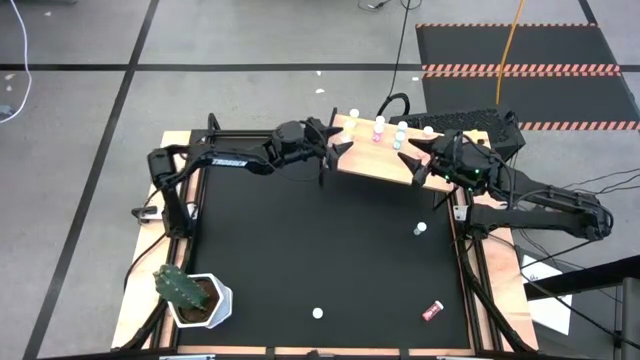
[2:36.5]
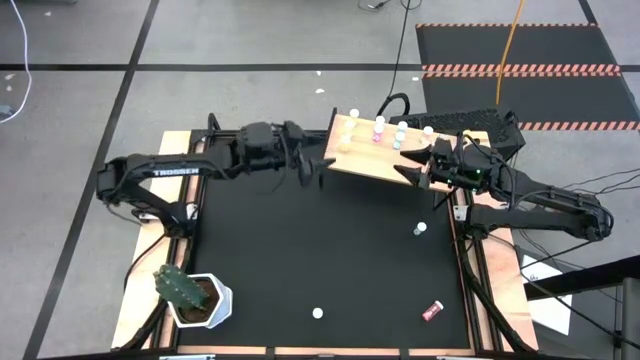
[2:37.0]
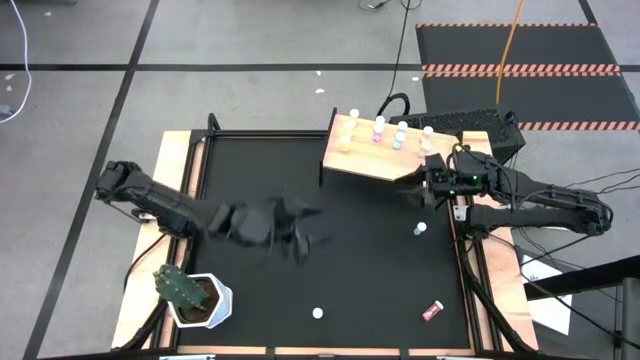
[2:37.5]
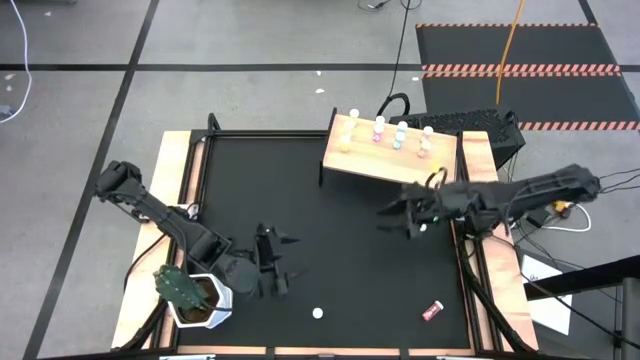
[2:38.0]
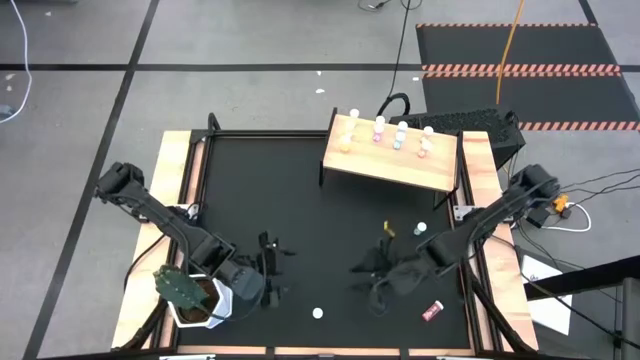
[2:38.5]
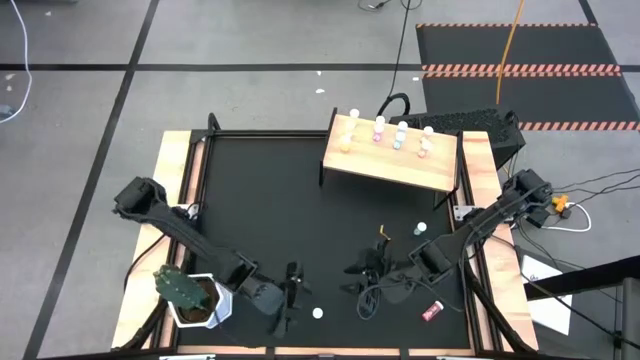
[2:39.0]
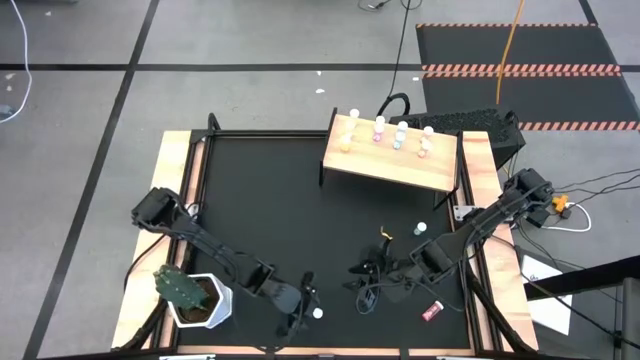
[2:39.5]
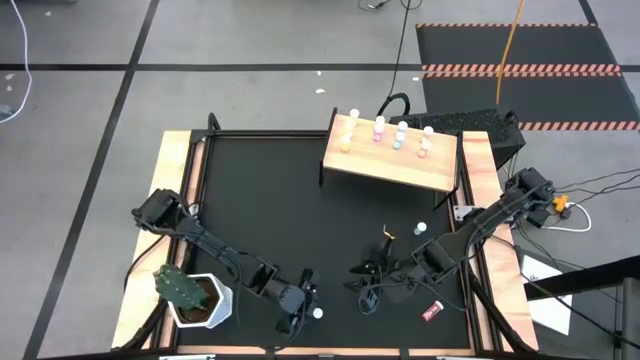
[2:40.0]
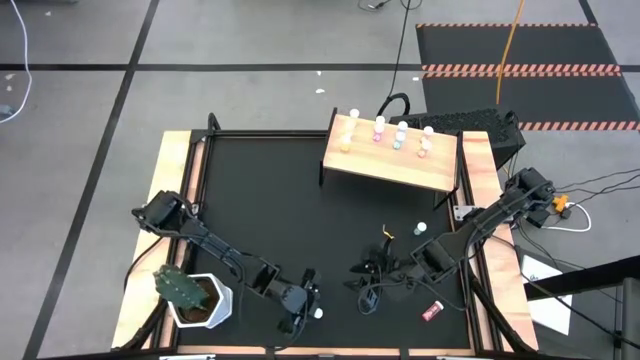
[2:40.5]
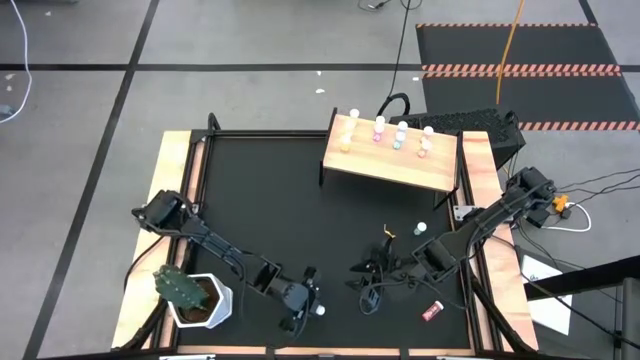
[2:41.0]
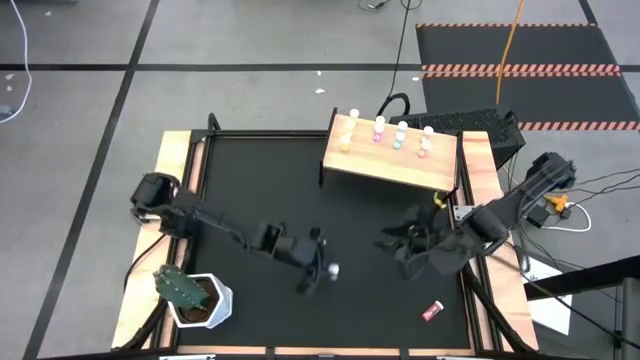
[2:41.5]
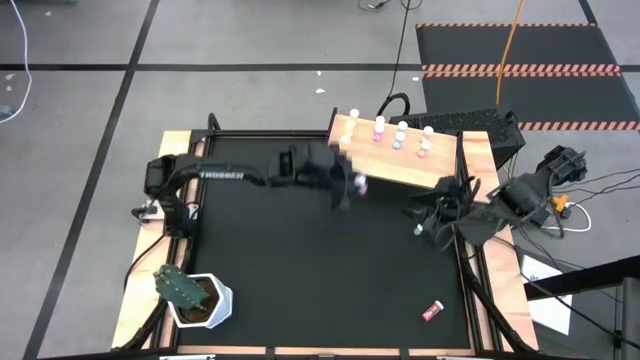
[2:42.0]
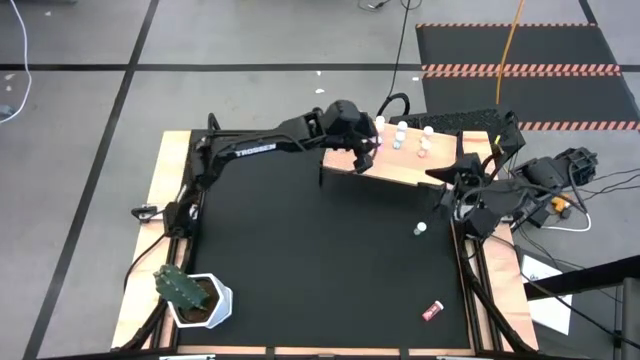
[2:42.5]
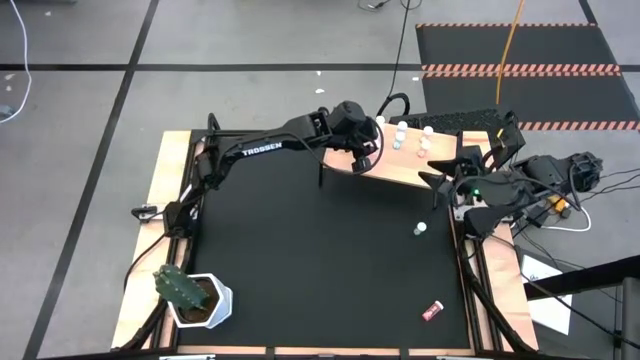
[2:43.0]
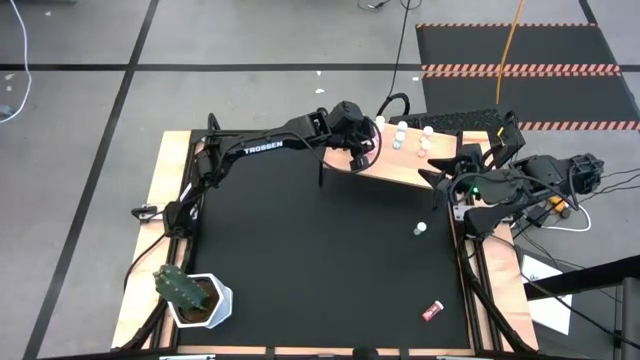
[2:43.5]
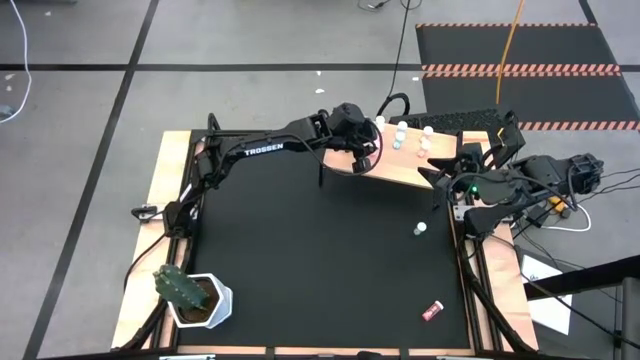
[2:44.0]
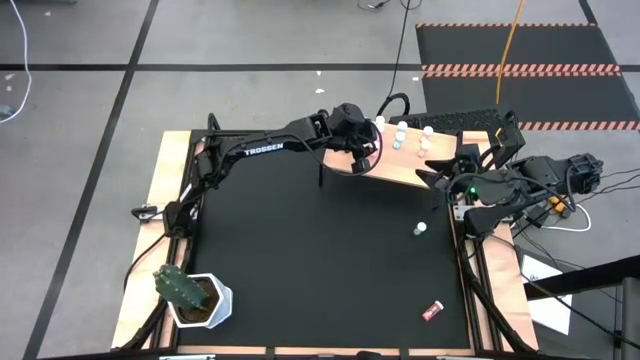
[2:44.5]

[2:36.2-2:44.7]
Task: Pick and place medicine bottles onto shelf by color
Put the pink pill bottle on the shelf aligned with the other pink bottles

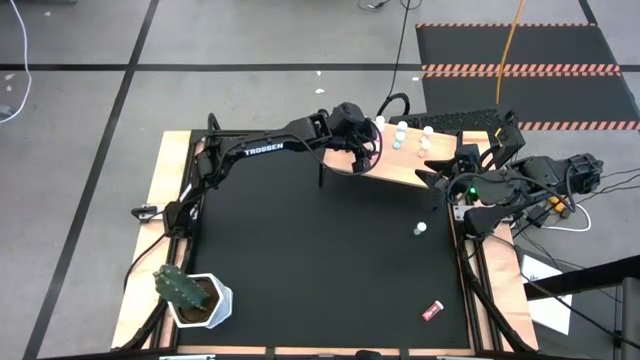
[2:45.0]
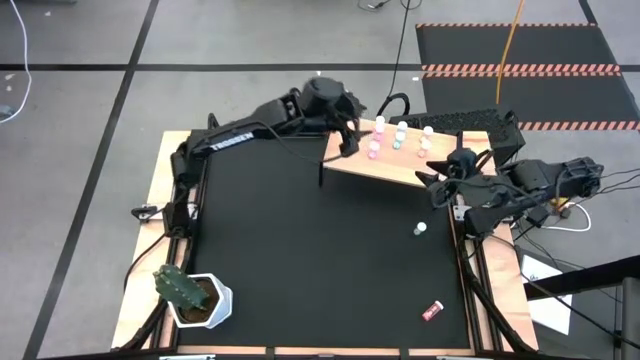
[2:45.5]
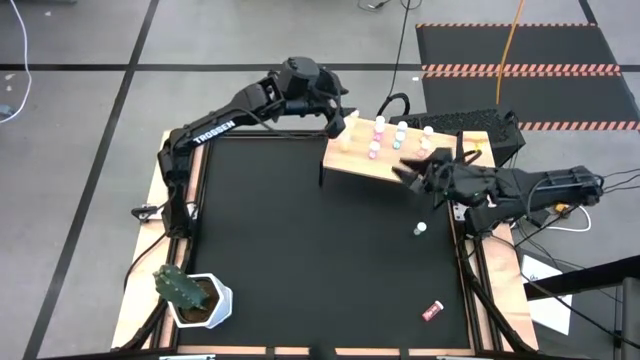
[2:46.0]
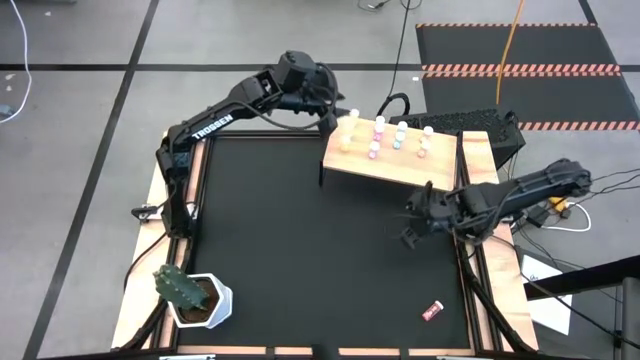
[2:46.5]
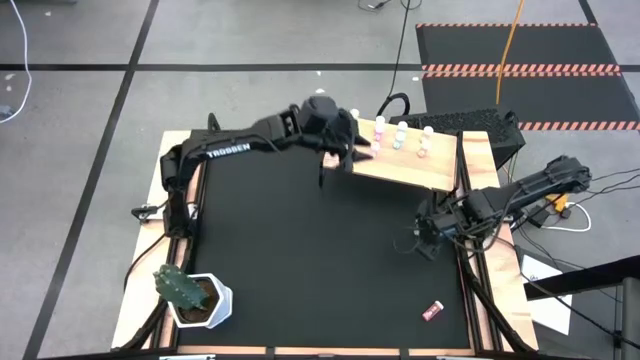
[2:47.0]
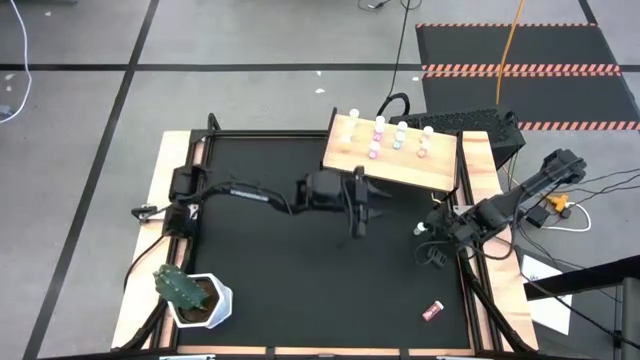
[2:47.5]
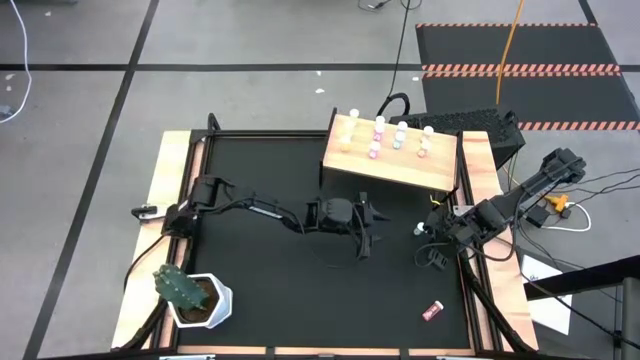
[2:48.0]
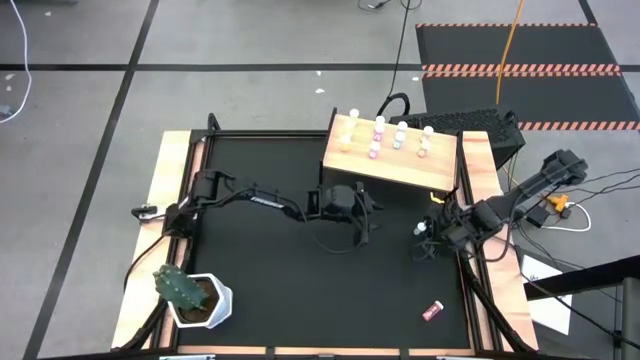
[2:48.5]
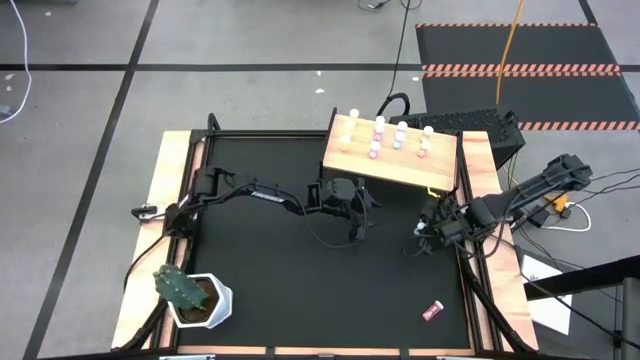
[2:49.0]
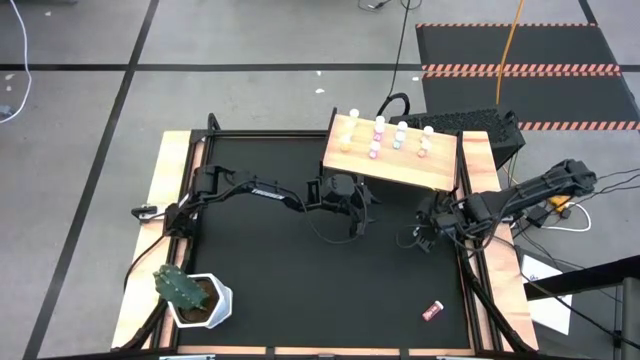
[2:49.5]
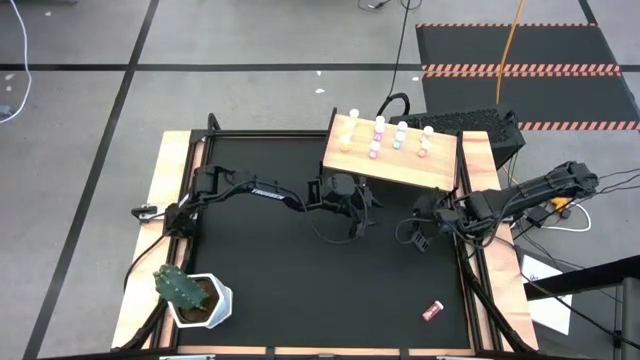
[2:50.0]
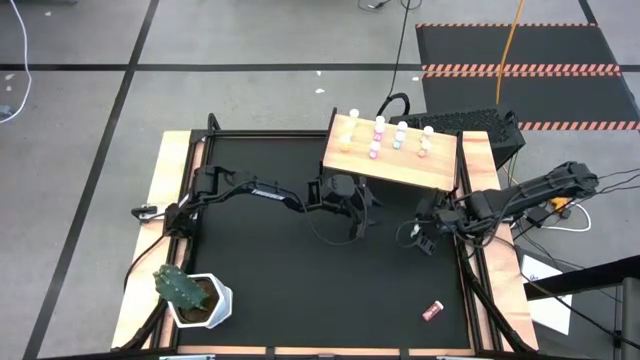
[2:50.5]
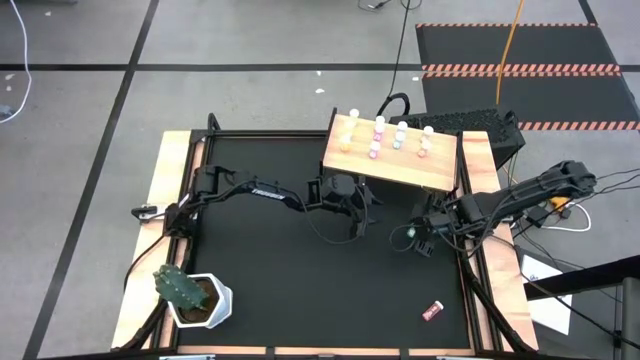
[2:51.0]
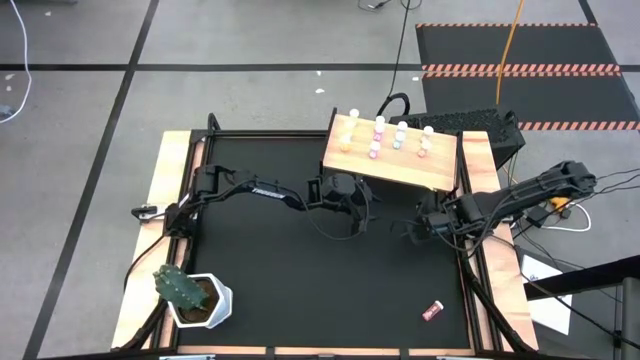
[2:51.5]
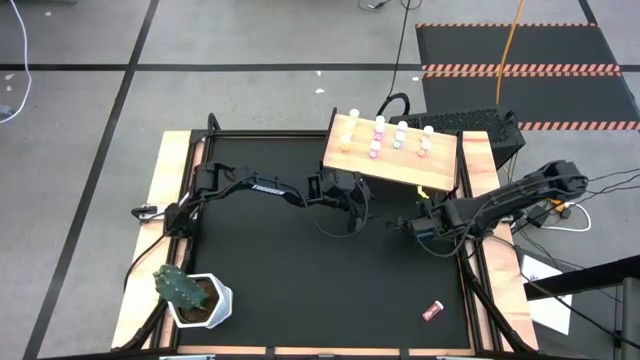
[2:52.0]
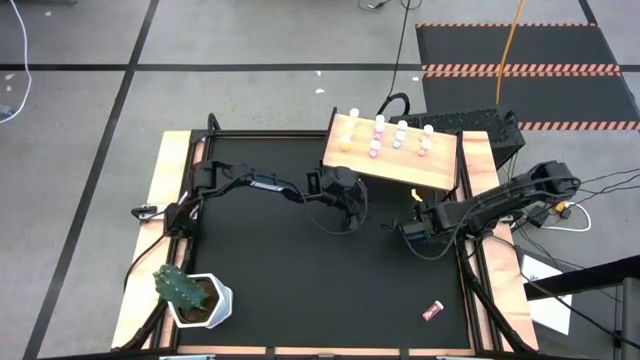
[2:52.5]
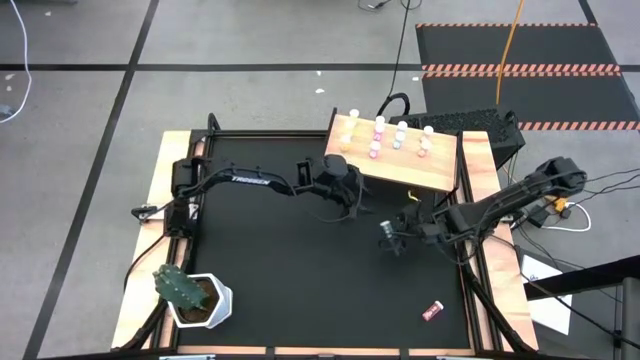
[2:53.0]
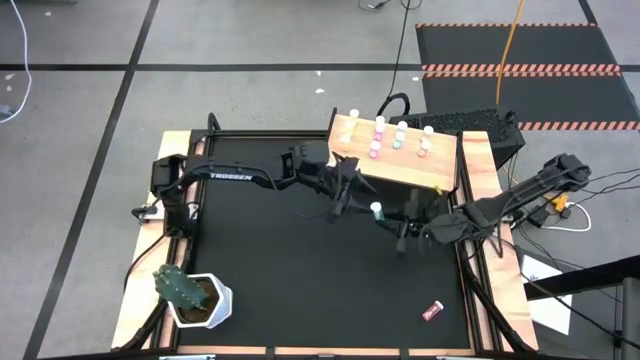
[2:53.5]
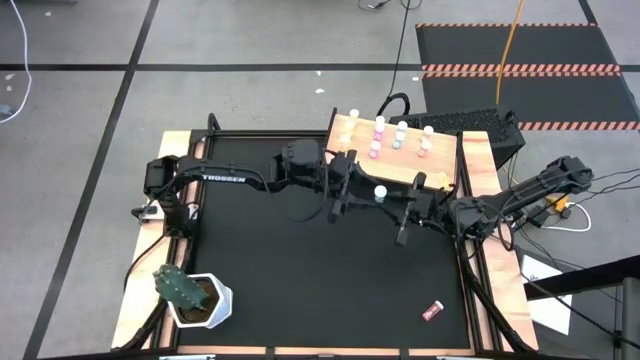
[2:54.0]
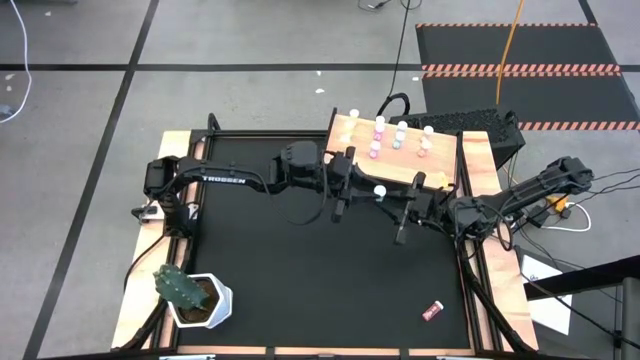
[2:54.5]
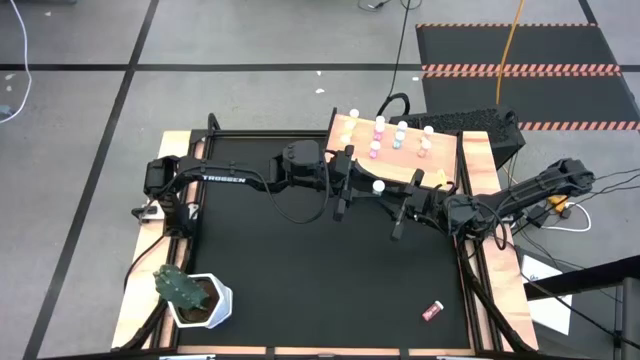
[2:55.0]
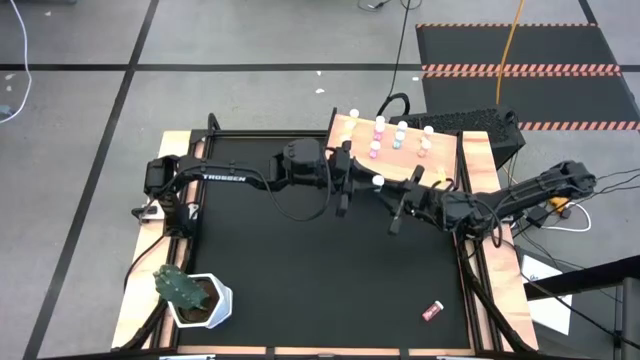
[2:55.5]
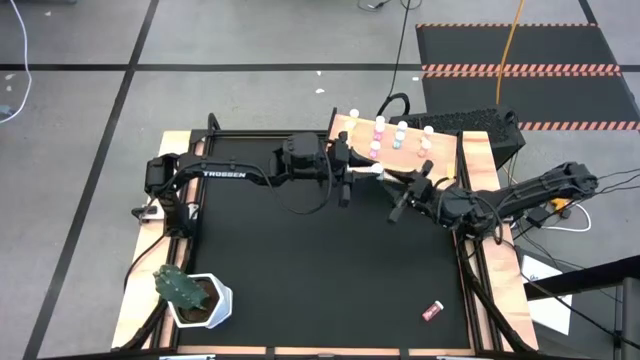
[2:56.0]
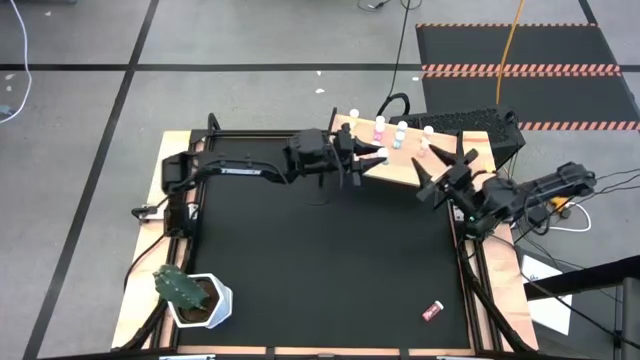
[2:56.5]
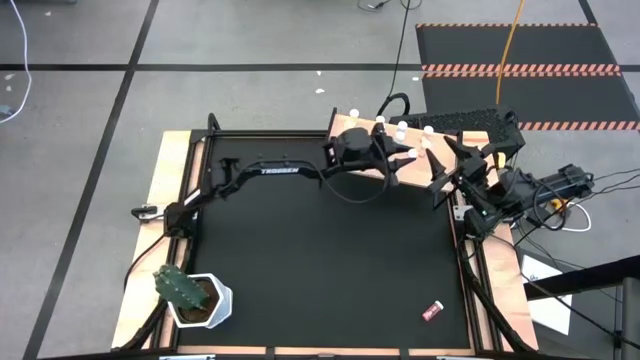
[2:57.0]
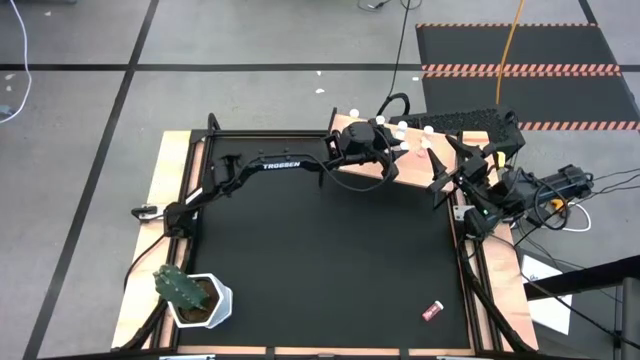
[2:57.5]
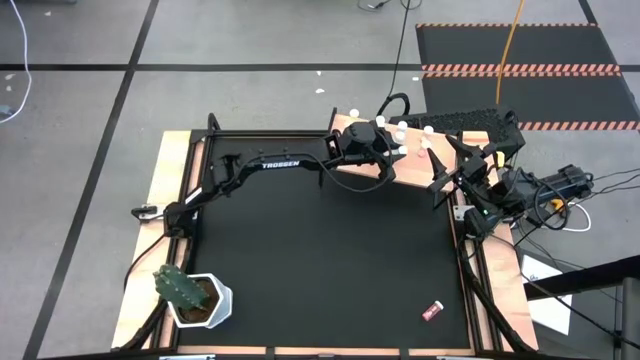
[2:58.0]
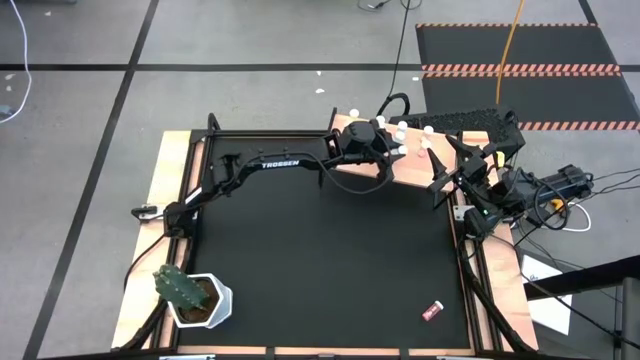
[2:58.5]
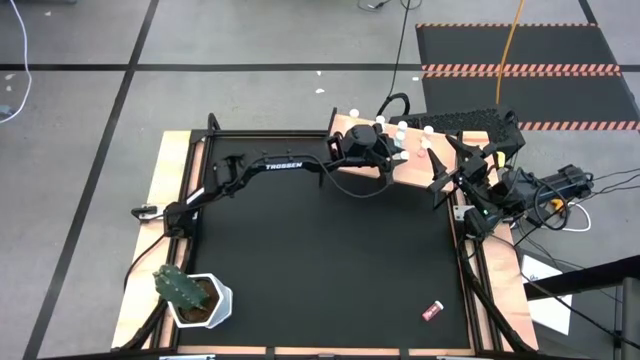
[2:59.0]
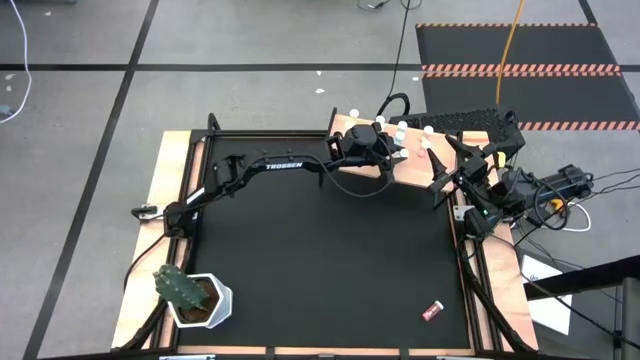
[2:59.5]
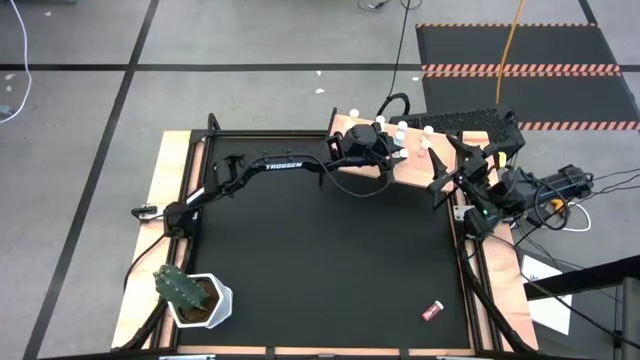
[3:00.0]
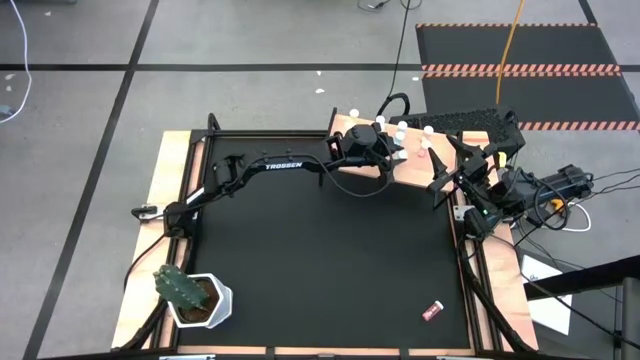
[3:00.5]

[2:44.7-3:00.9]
Put the green pill bottle on the shelf aligned with the blue pill bottles
